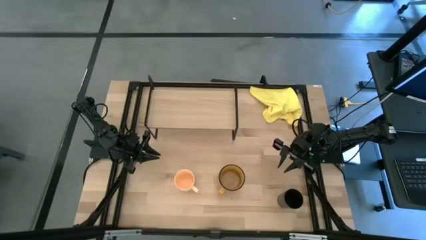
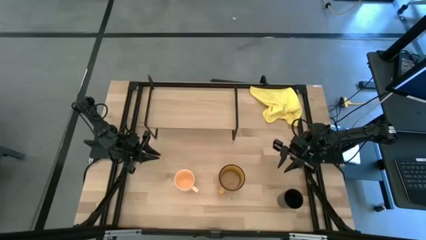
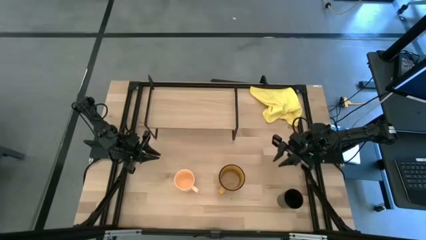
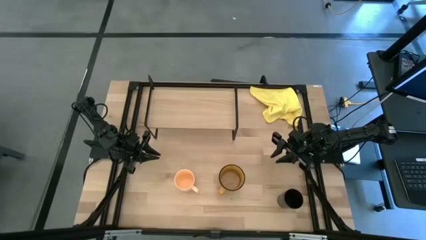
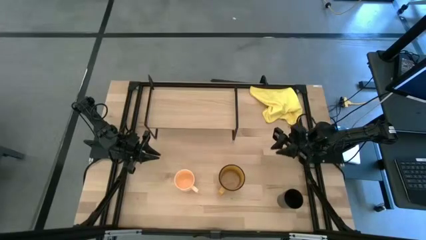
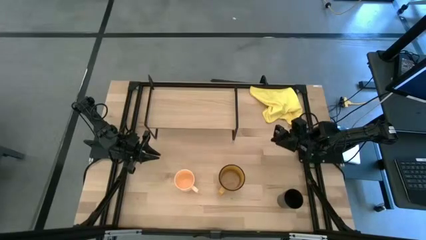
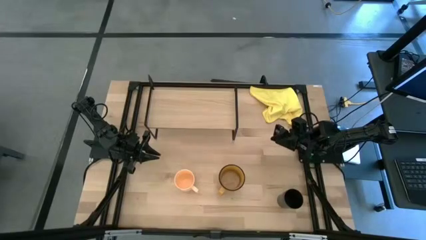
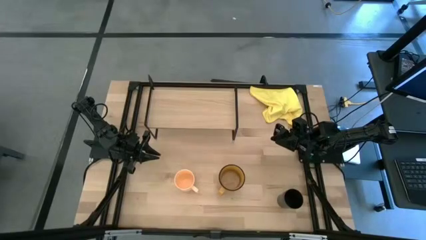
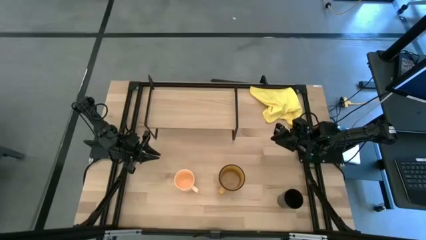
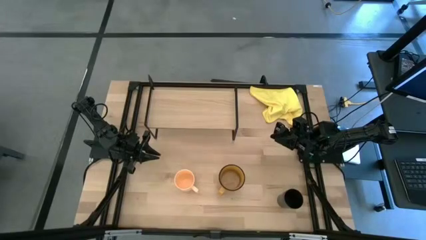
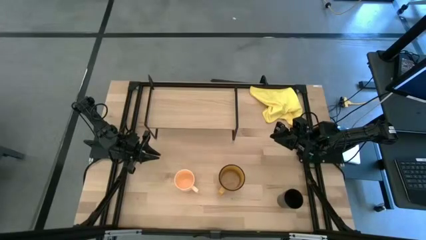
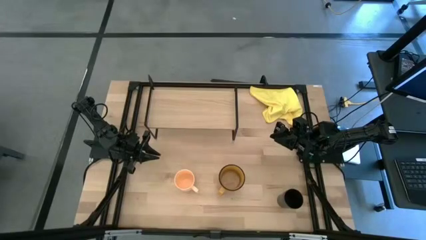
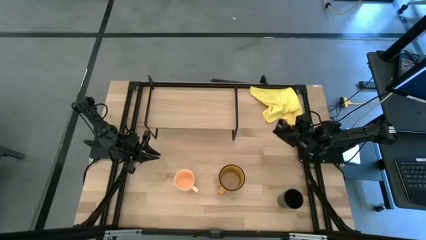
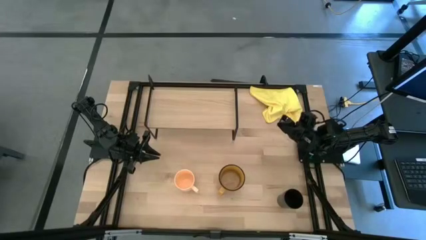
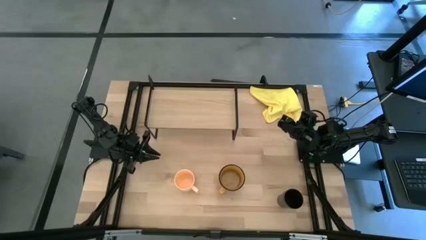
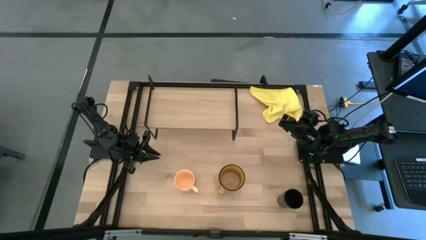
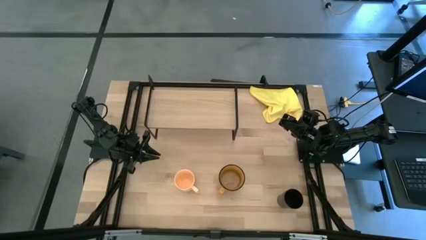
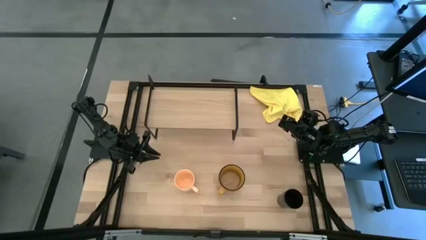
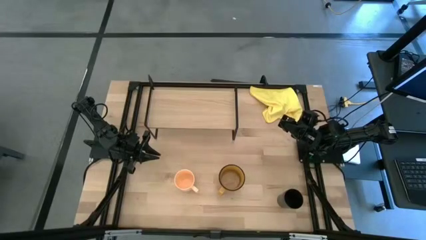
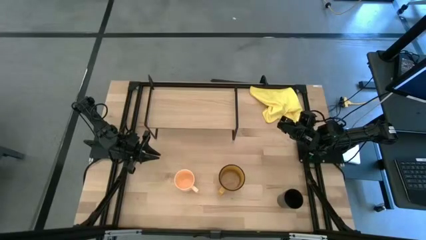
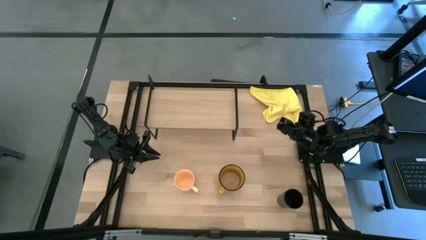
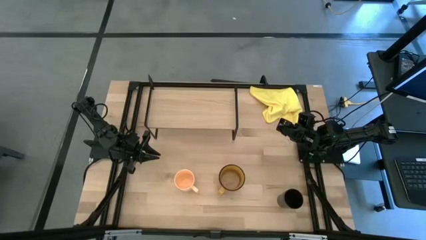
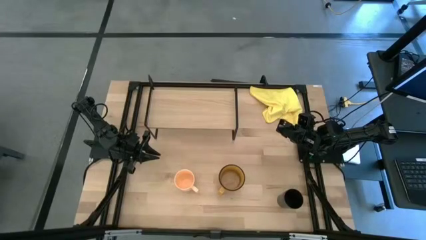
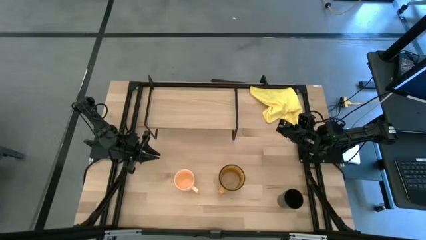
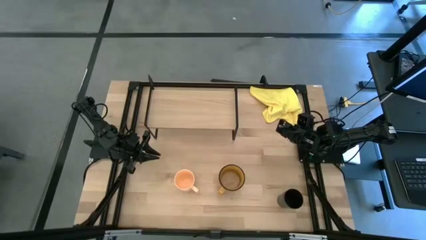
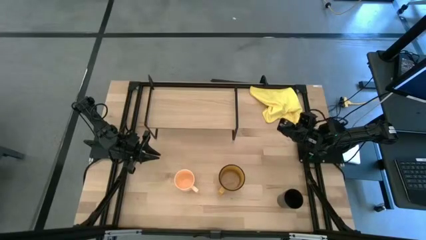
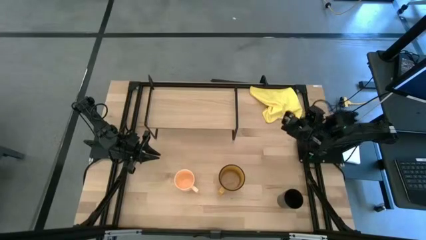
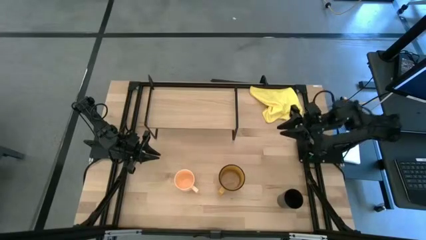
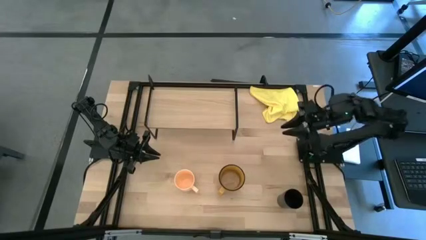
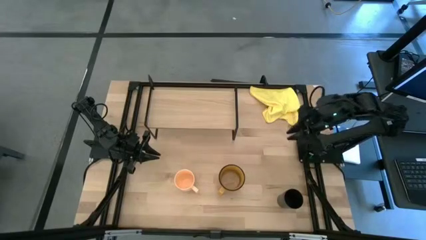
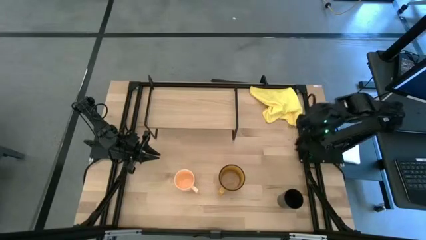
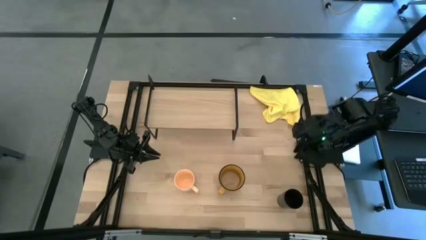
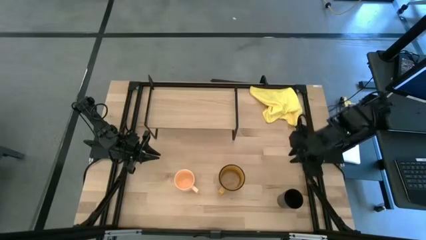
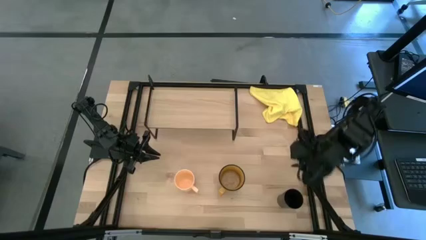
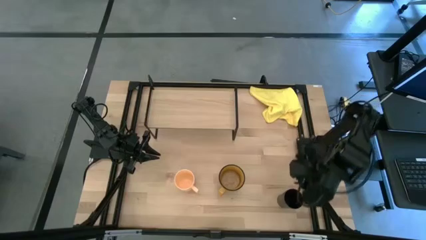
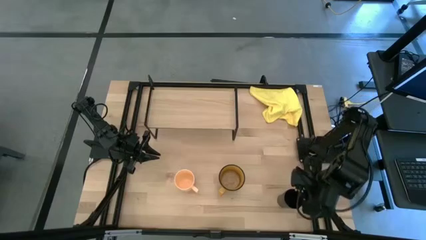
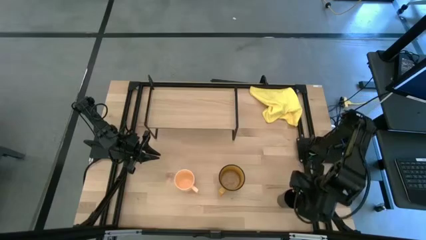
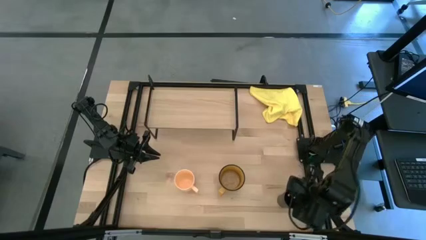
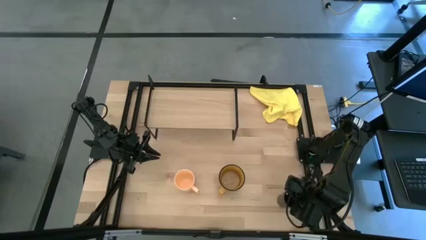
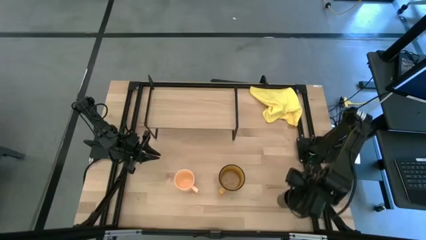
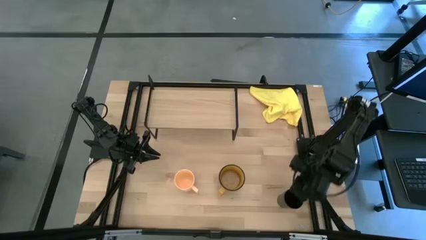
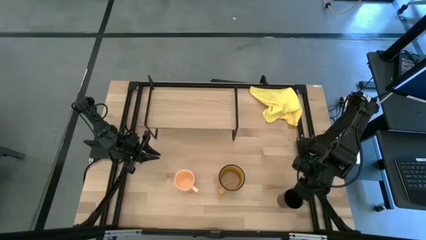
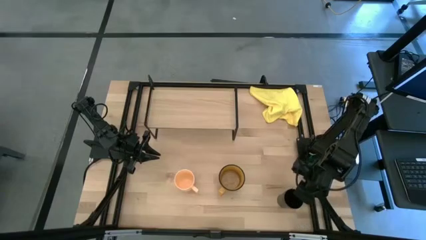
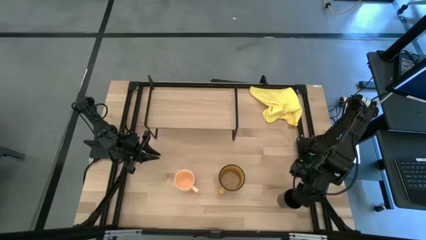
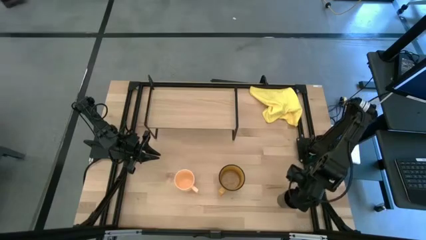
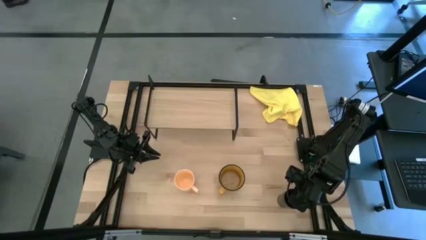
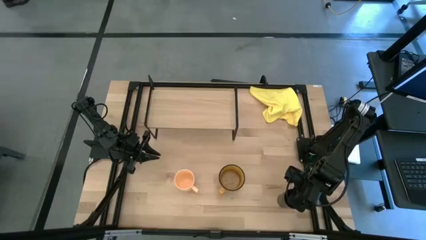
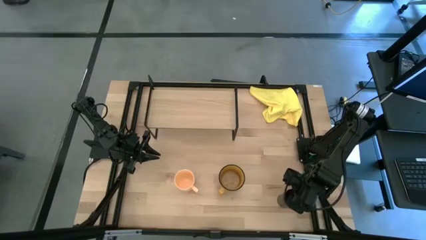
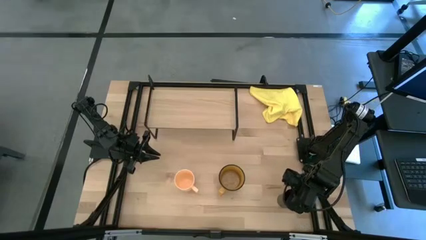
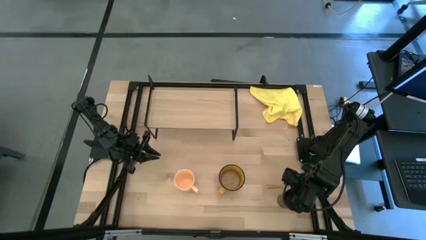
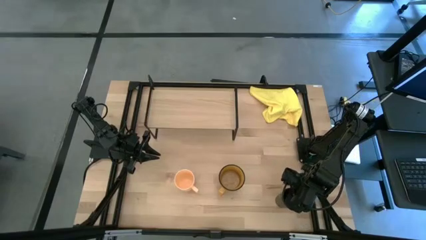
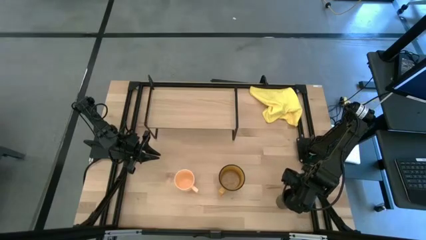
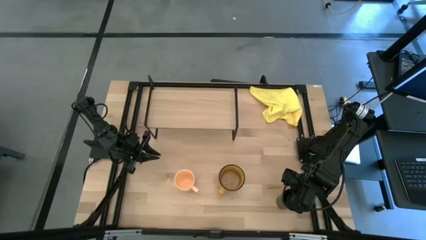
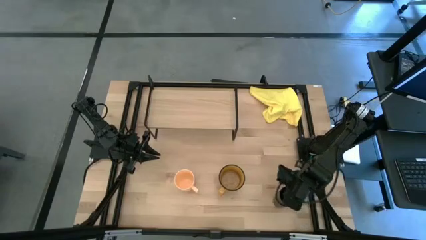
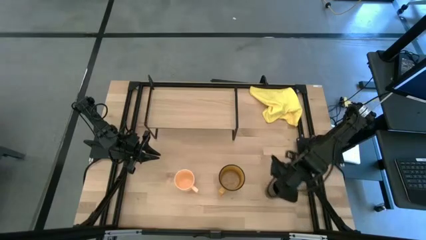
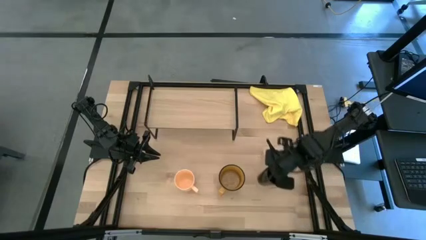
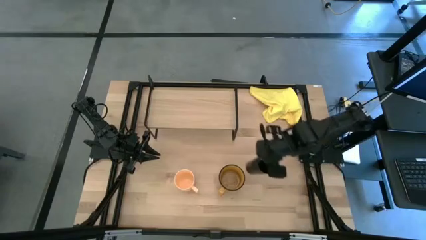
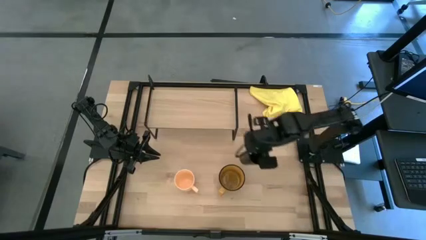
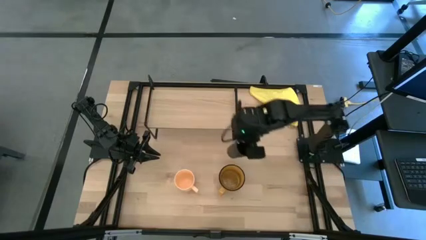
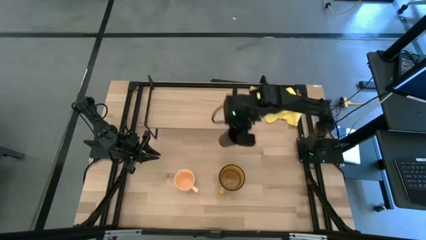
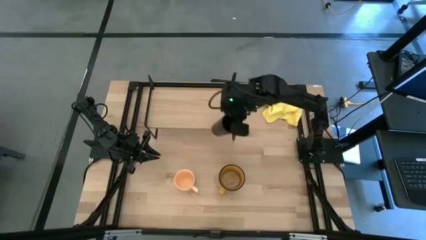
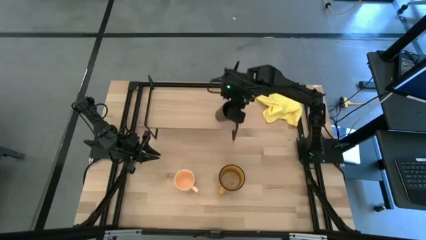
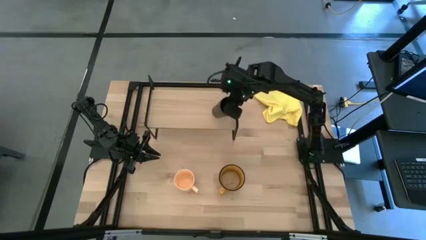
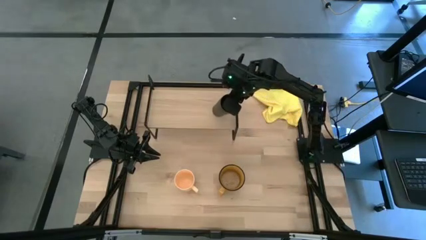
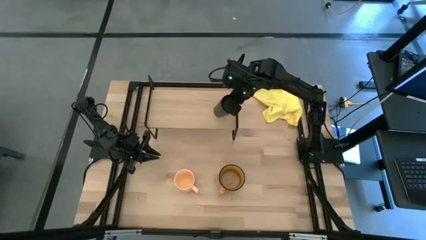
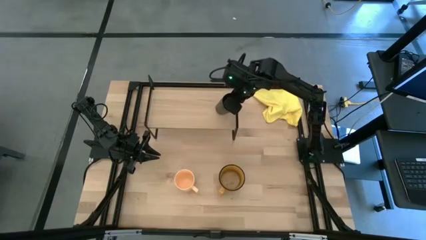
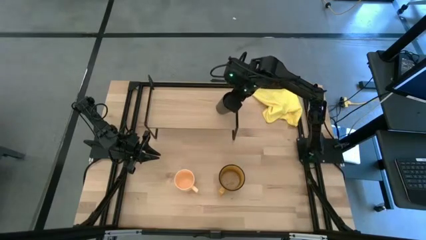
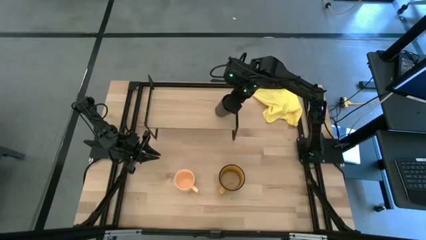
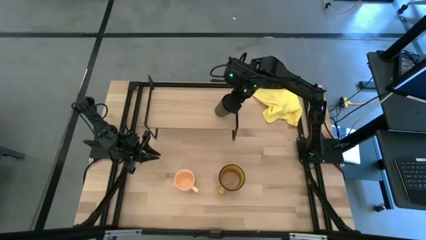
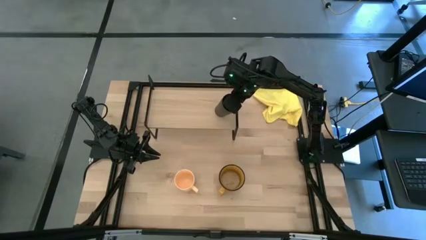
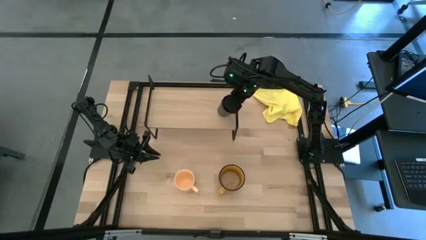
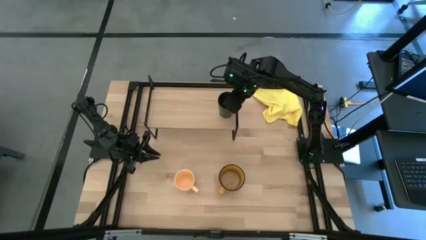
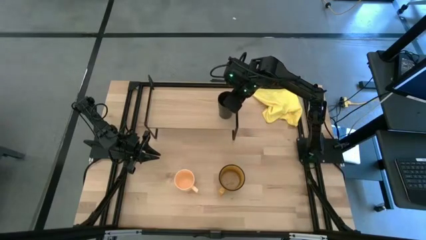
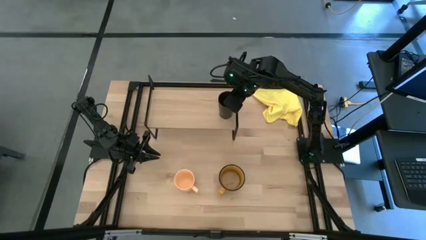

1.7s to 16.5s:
Task: Stack small to large cups/mugs on shelf
Put the black cup on the shelf
